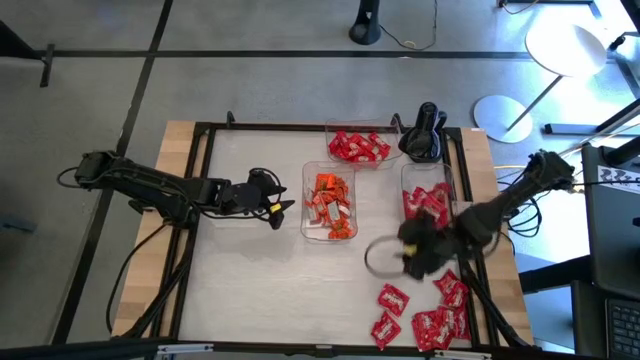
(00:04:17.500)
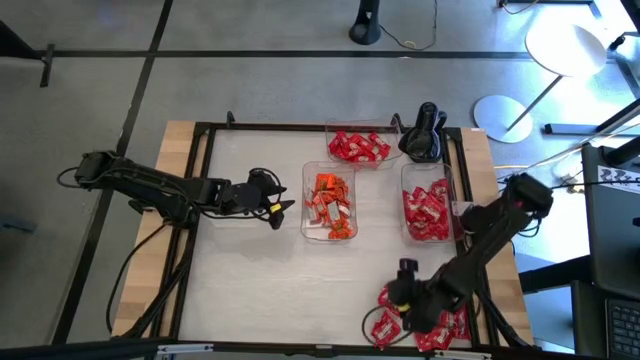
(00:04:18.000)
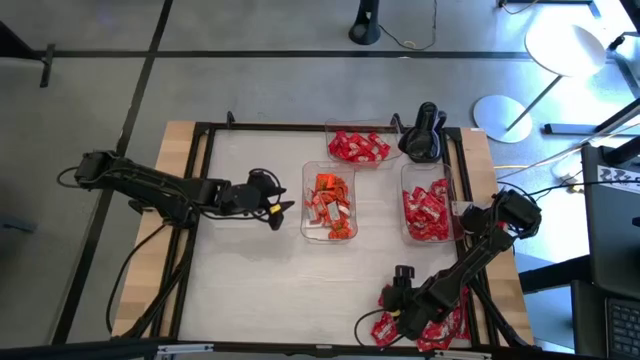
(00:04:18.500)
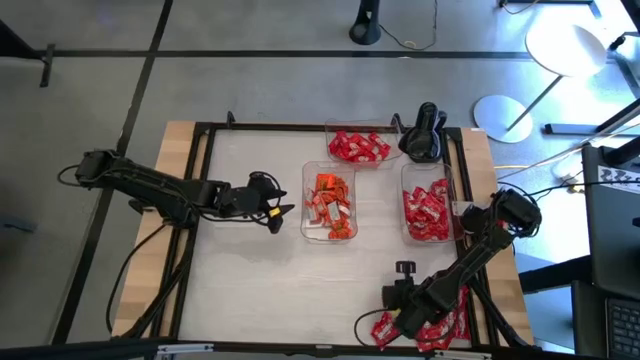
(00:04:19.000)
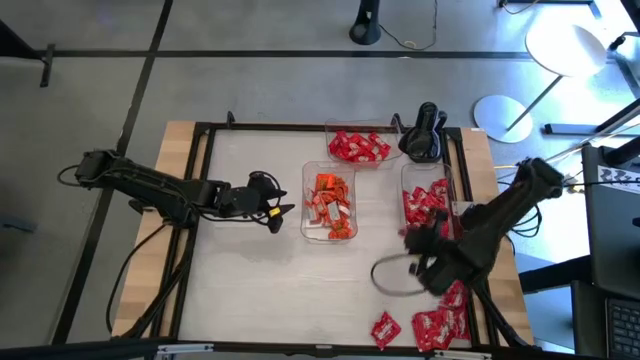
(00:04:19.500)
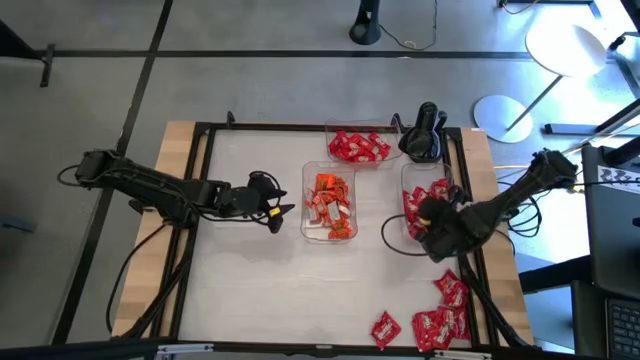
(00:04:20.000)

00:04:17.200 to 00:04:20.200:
Task: Sort candy
Put the red candy pack into the bottom right transparent bin

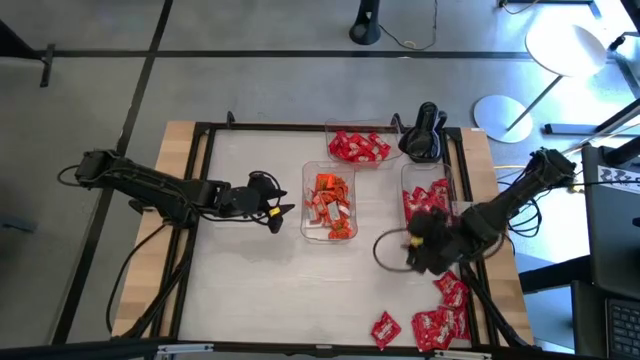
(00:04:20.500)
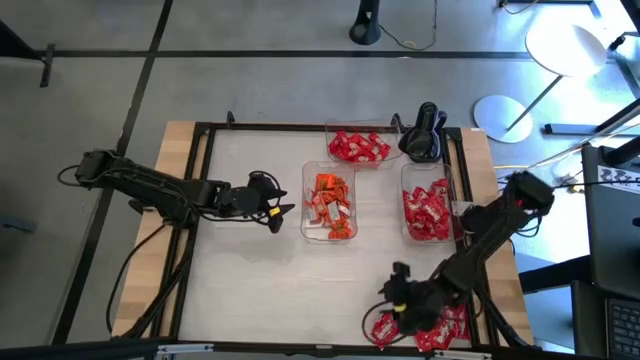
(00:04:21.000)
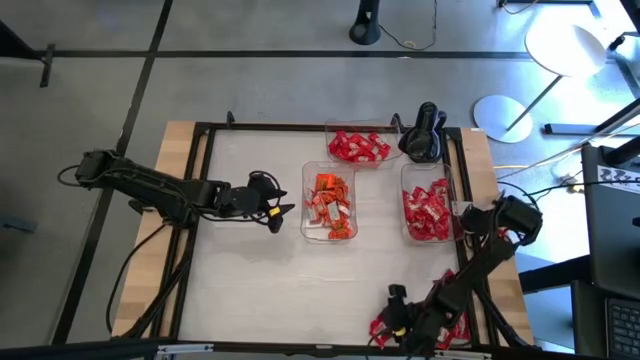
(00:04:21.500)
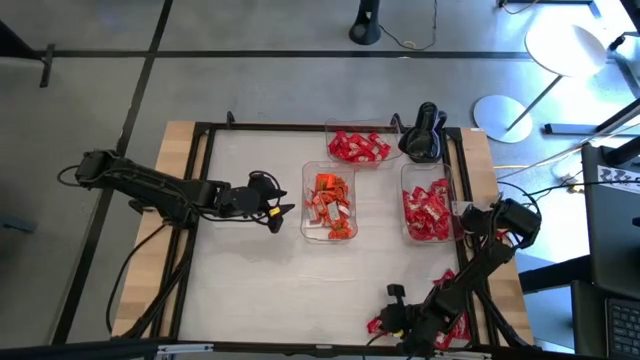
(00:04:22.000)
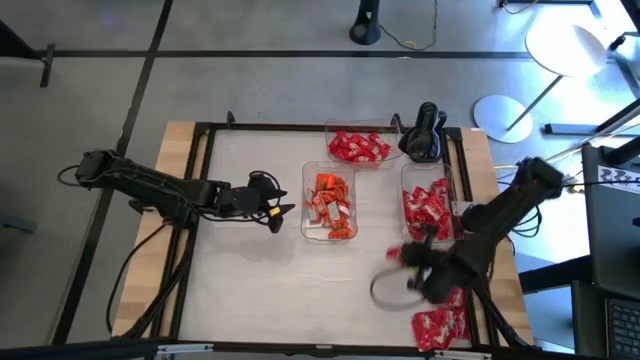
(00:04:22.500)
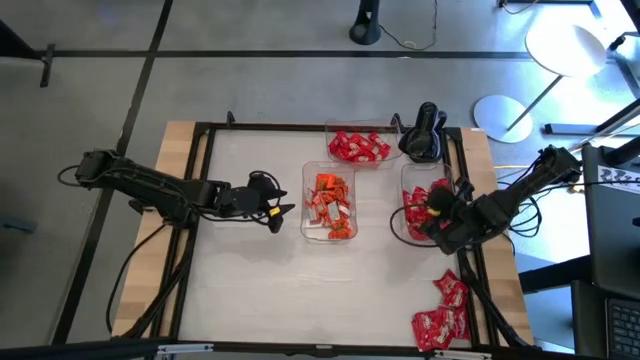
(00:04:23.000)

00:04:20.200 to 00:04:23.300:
Put the red candy pack into the bottom right transparent bin

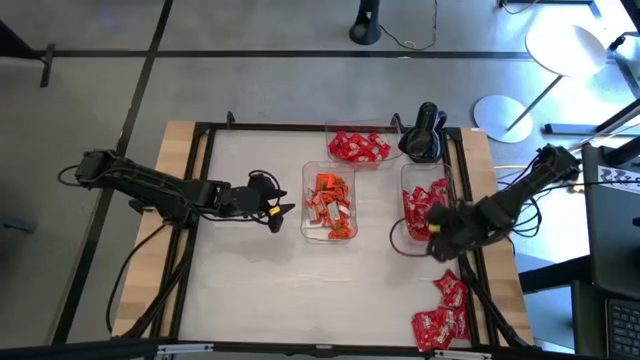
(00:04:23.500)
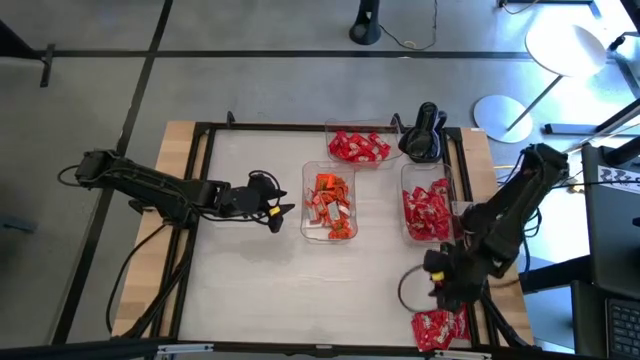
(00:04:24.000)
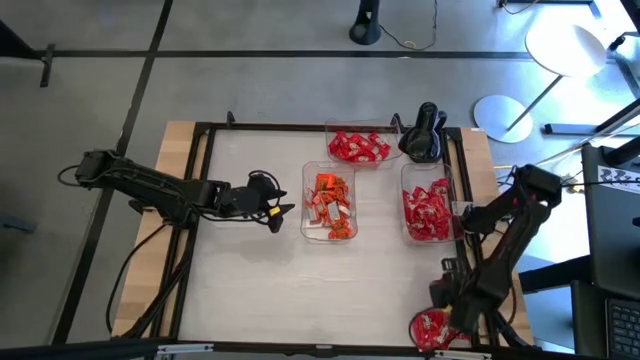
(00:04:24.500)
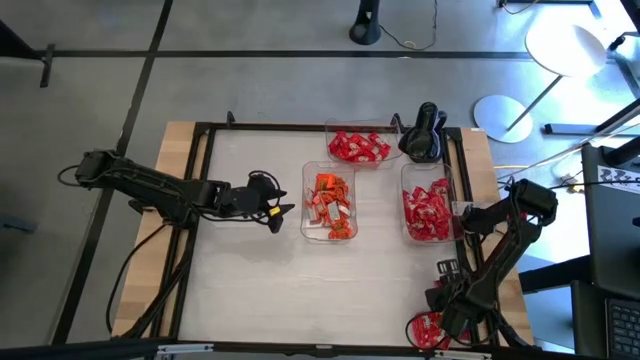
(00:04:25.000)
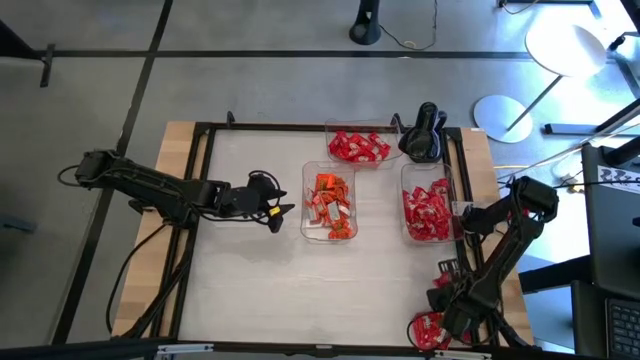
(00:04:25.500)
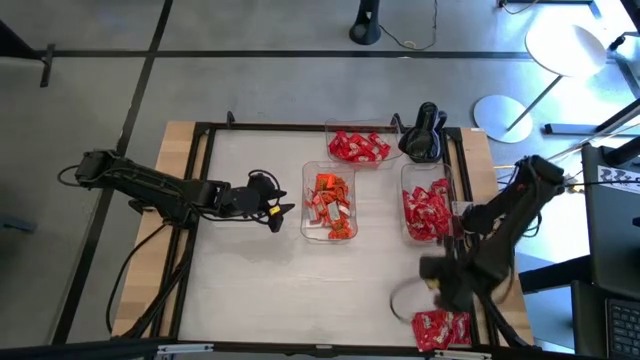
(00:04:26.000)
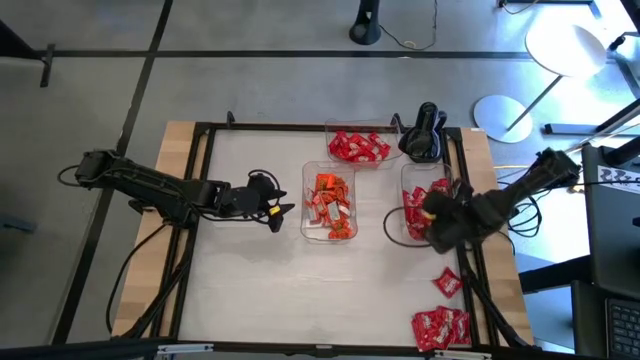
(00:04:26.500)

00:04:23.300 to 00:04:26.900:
Put the red candy pack into the bottom right transparent bin

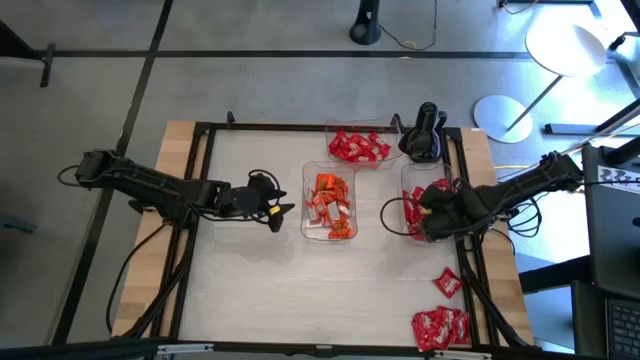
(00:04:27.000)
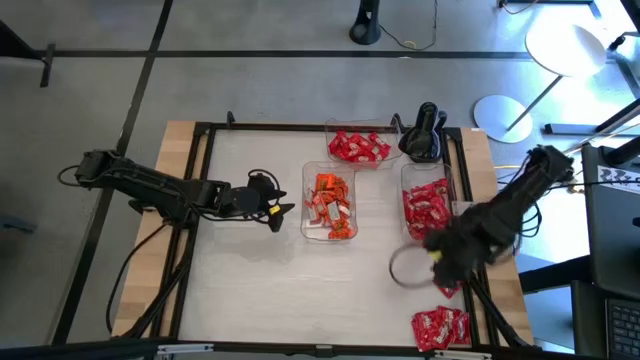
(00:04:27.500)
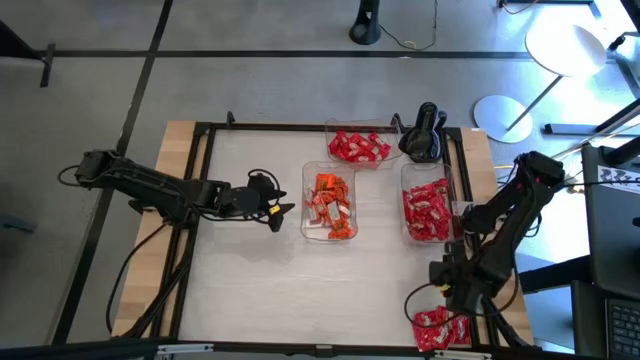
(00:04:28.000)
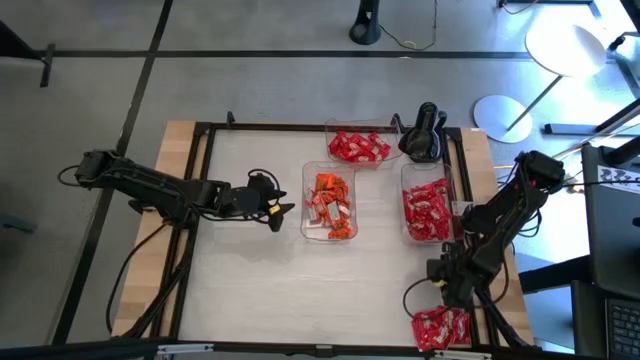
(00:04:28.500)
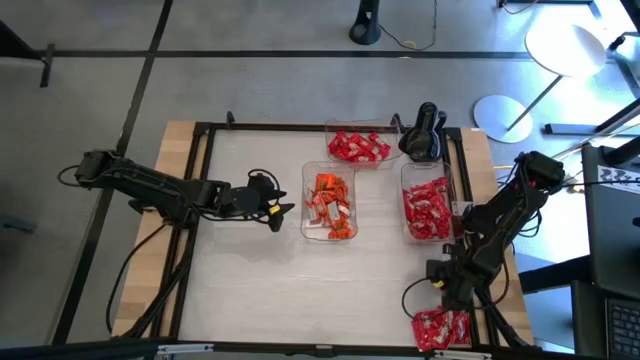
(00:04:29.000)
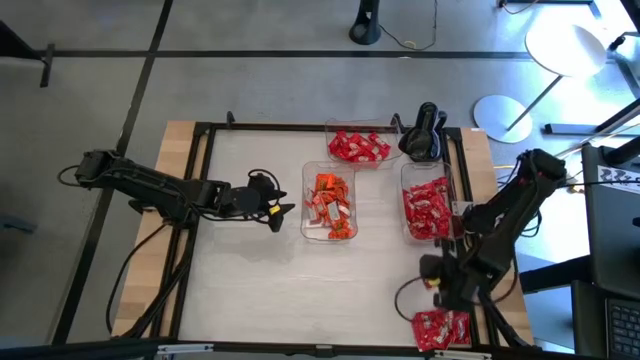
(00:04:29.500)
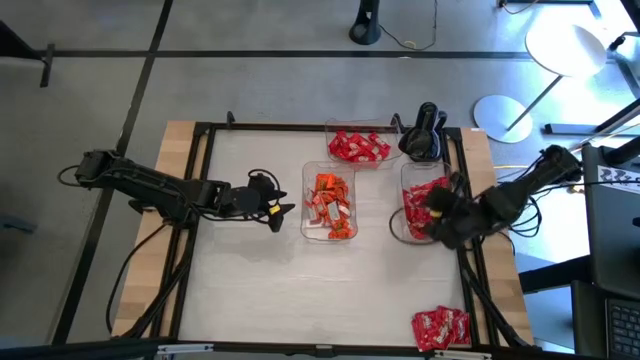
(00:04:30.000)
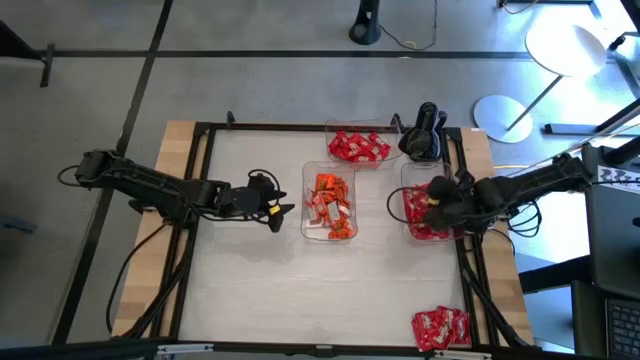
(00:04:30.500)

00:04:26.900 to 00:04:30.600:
Put the red candy pack into the bottom right transparent bin

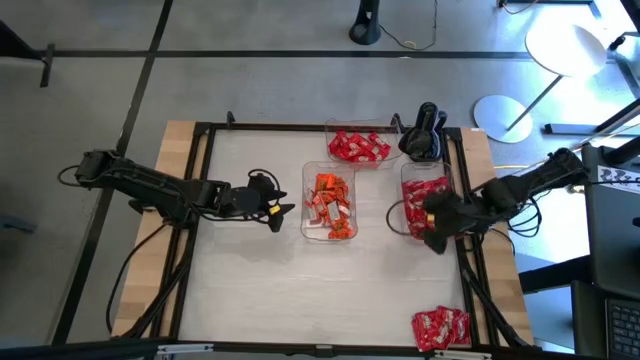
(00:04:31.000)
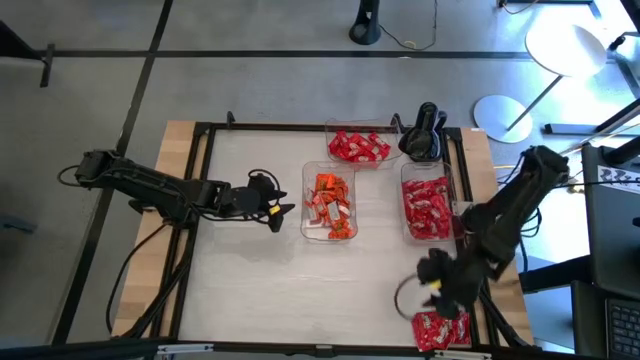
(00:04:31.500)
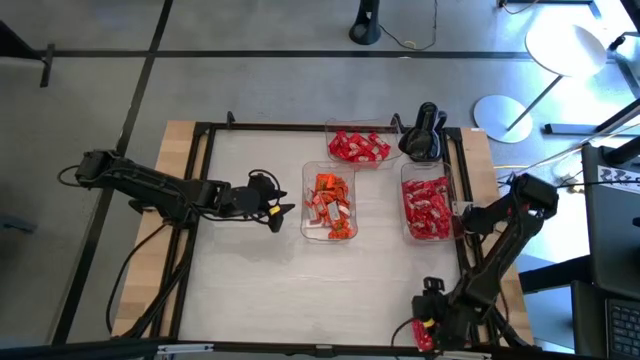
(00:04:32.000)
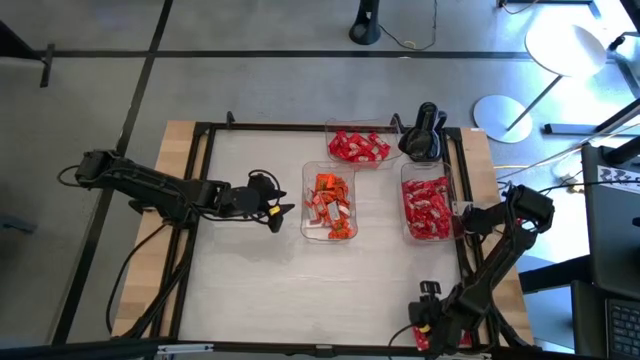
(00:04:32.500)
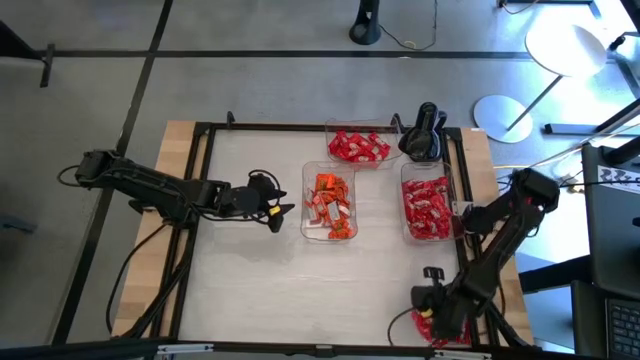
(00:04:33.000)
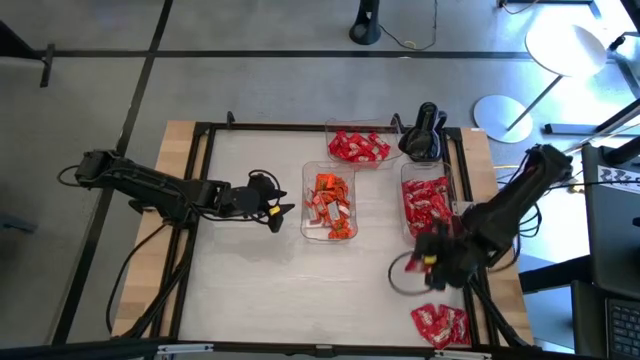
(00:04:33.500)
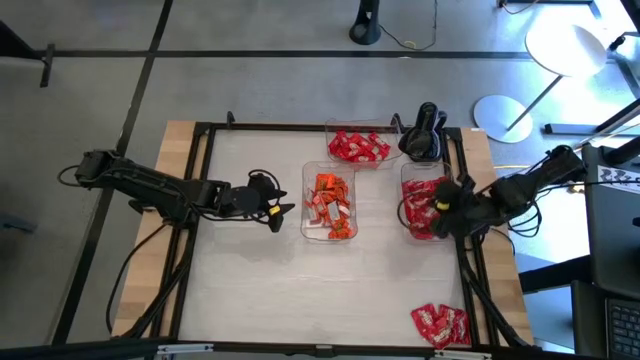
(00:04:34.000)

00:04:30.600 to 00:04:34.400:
Put the red candy pack into the bottom right transparent bin

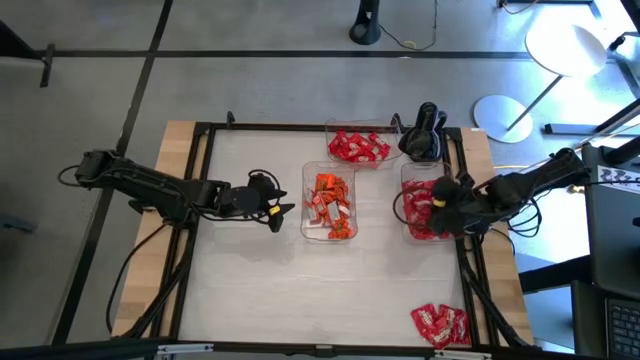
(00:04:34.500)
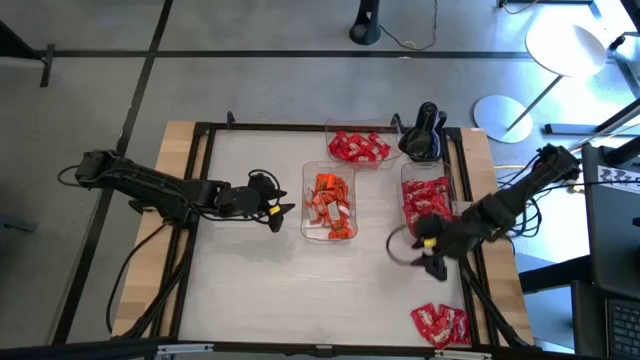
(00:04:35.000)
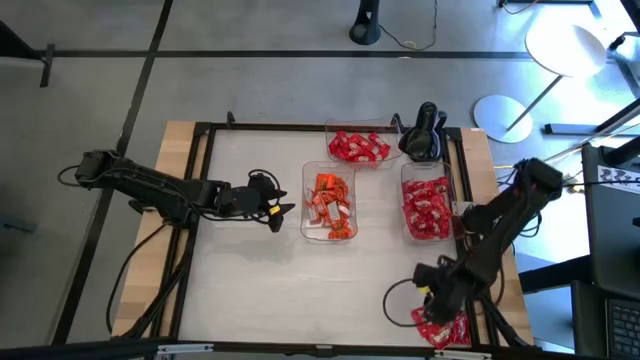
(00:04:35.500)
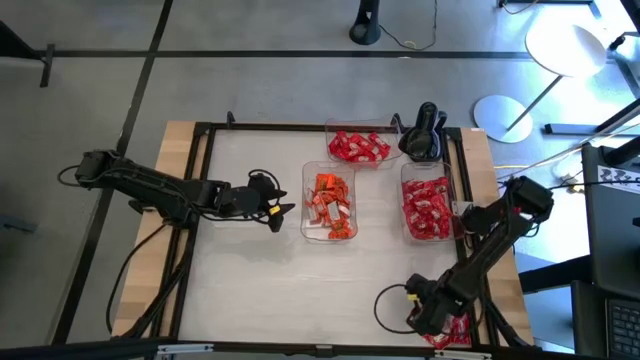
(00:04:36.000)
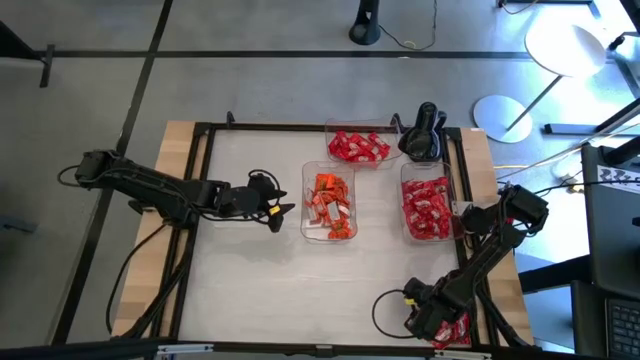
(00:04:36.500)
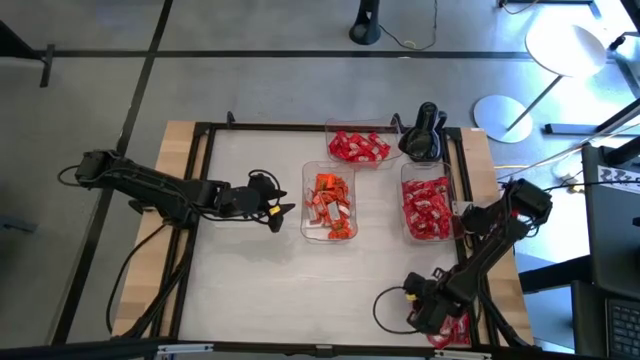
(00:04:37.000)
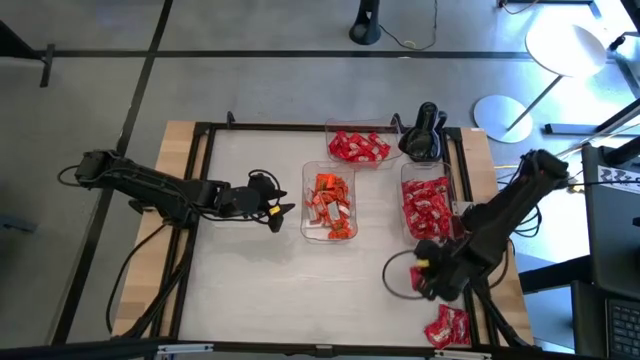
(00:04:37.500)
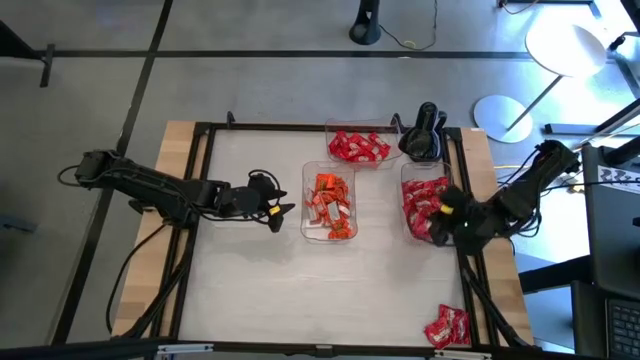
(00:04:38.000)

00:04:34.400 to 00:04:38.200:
Put the red candy pack into the bottom right transparent bin
